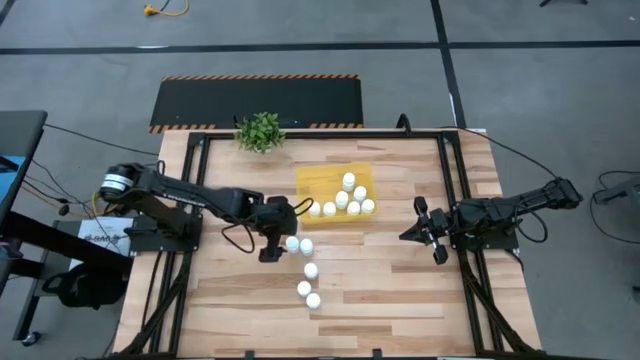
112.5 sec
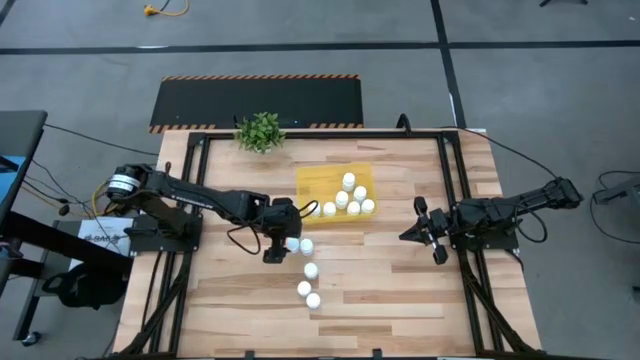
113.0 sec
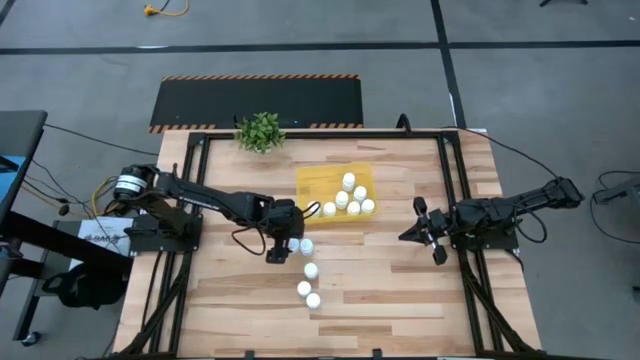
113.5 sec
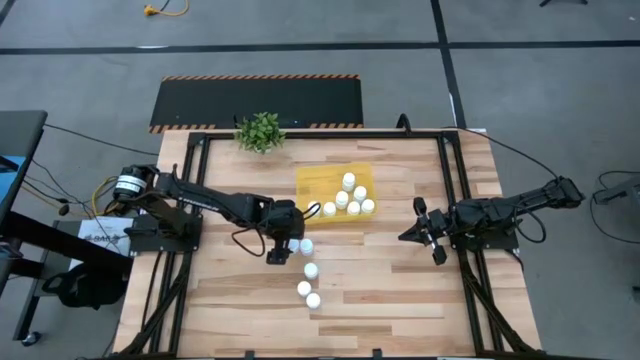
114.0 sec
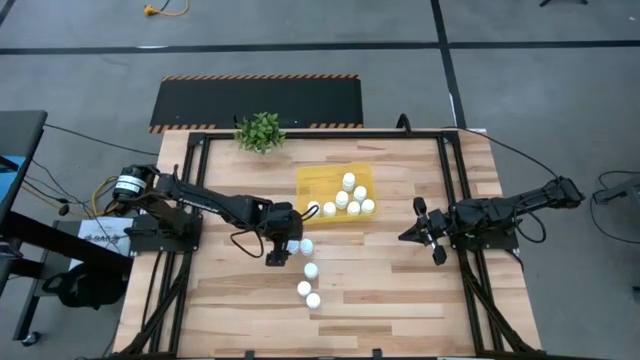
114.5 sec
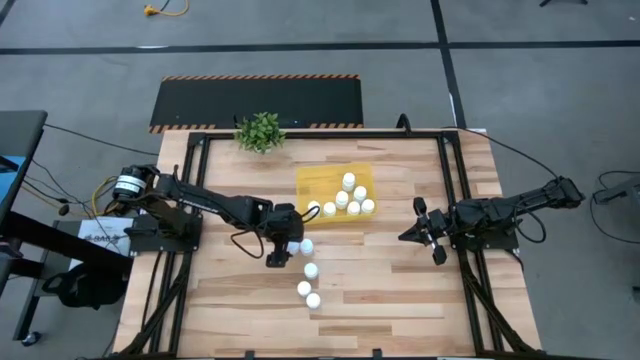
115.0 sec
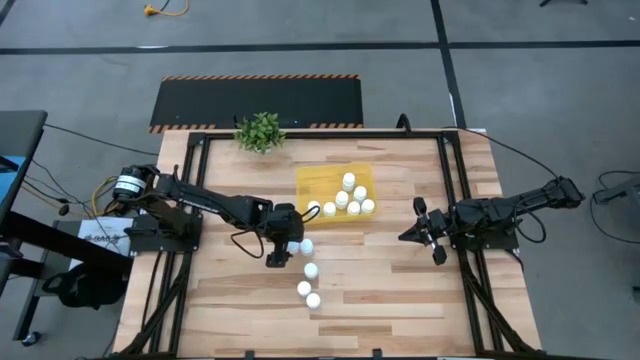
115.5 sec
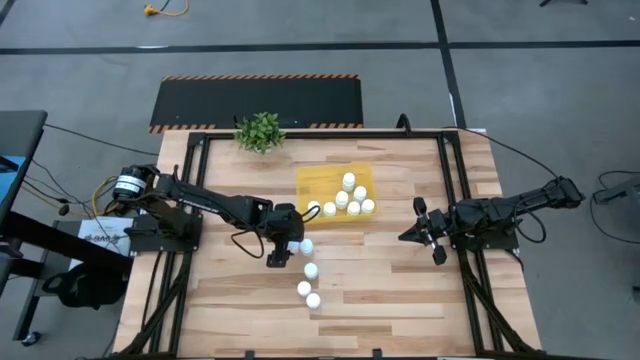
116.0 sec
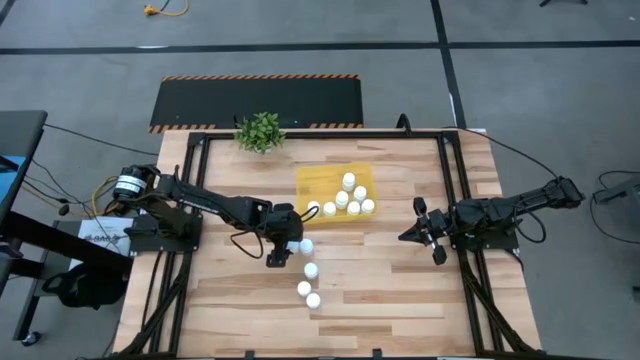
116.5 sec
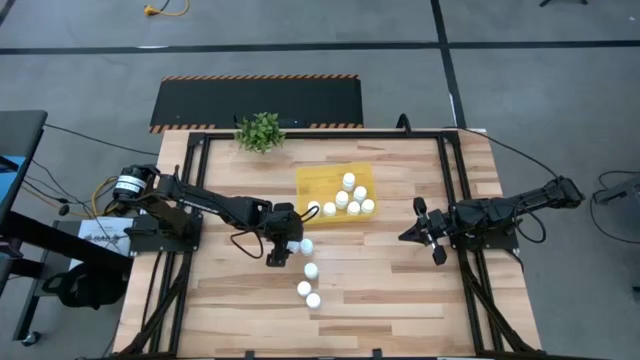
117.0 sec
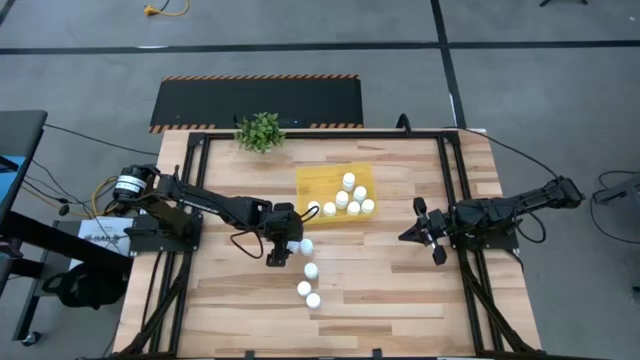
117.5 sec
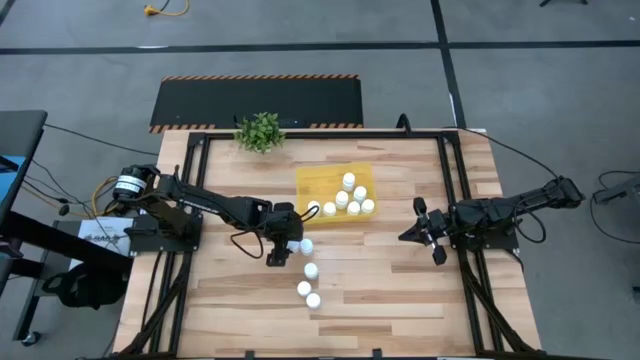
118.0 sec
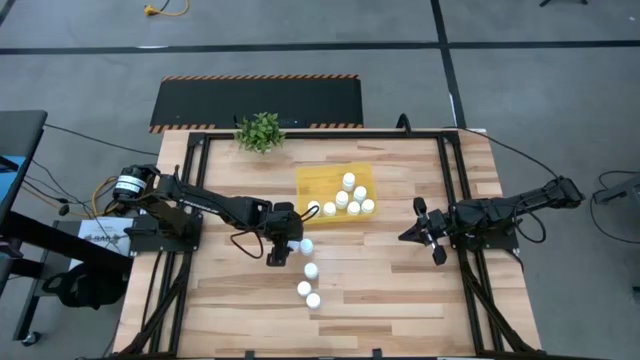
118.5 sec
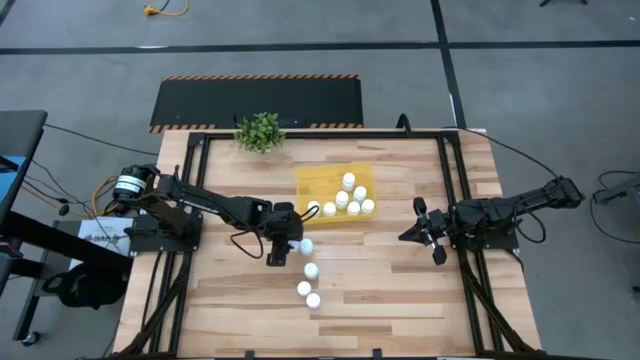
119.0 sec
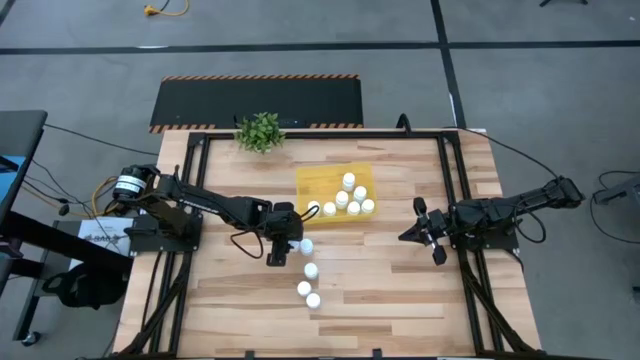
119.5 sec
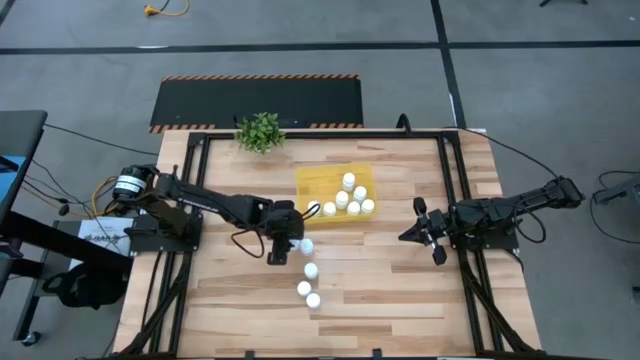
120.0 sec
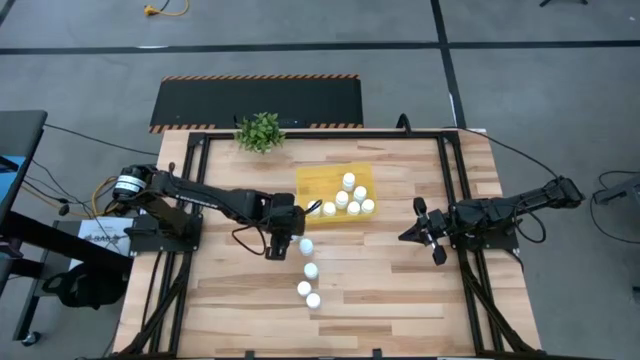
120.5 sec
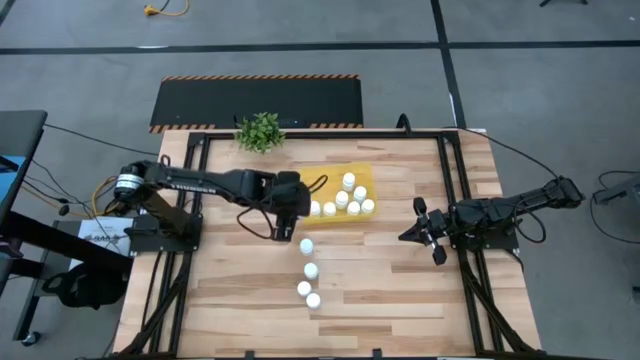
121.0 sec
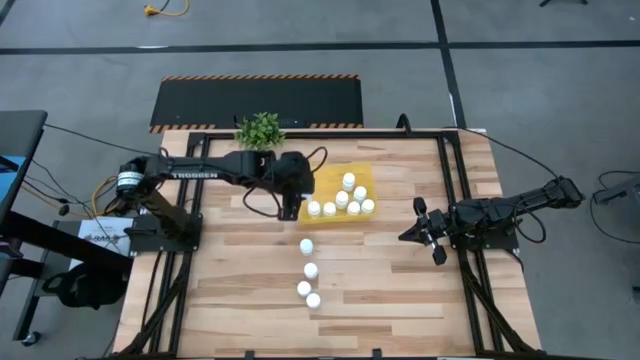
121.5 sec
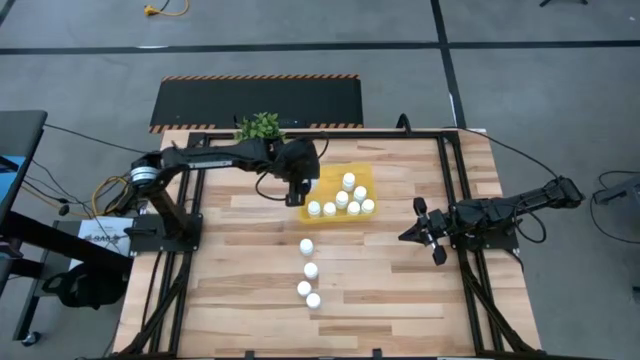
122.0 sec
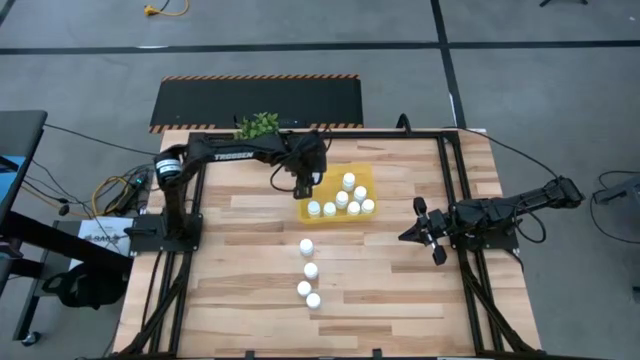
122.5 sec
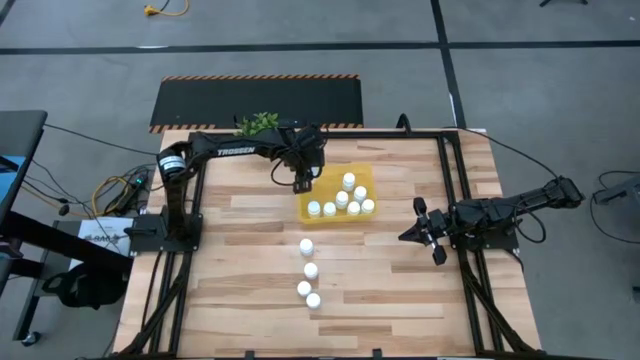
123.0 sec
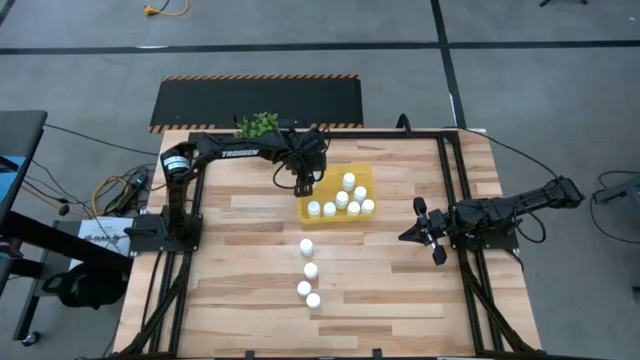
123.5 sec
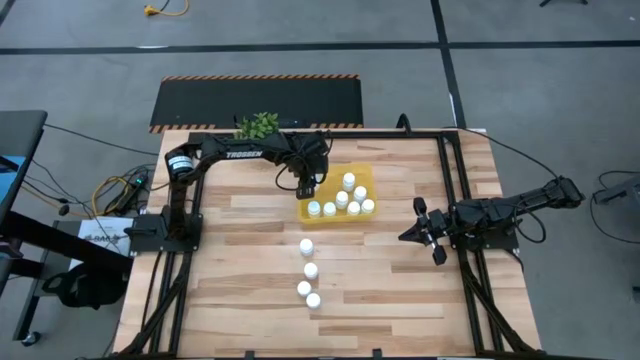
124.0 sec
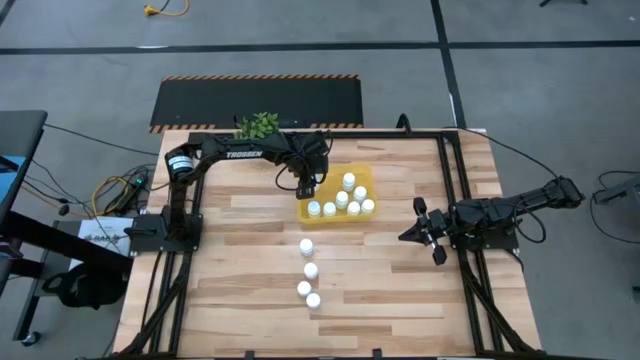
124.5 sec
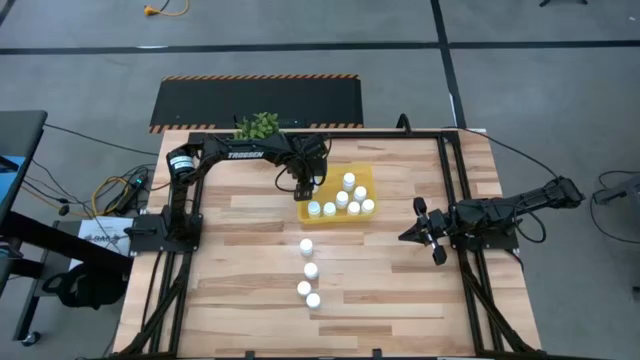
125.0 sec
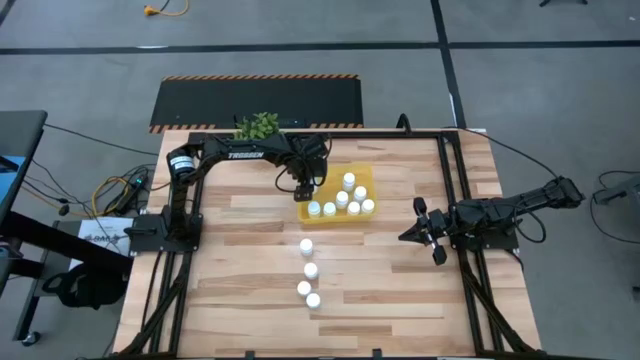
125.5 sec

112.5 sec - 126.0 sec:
Task: Pick and place pill bottles into a basket
Put the white medicine bottle into the yellow bin

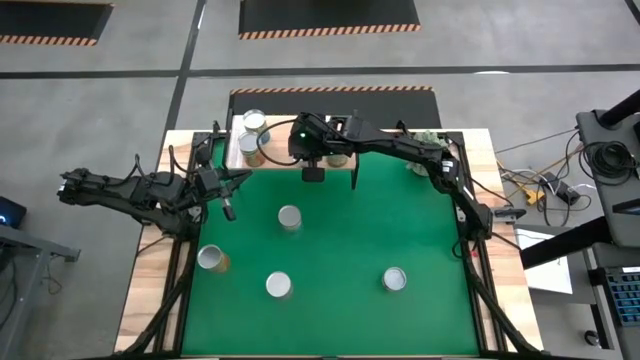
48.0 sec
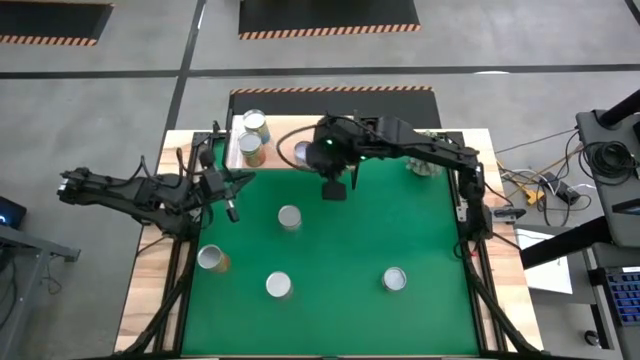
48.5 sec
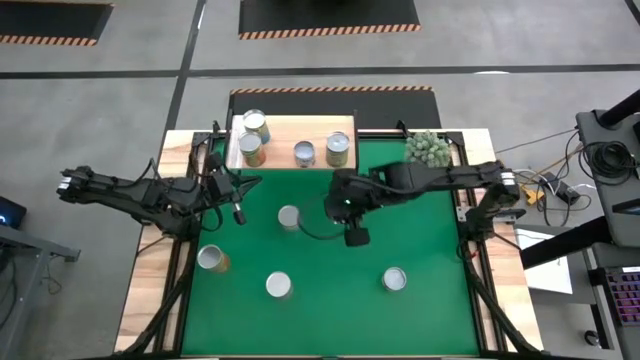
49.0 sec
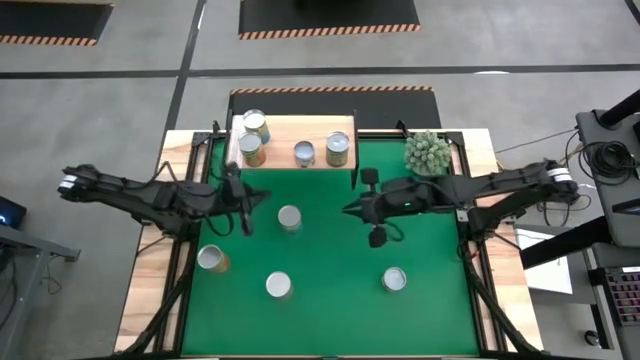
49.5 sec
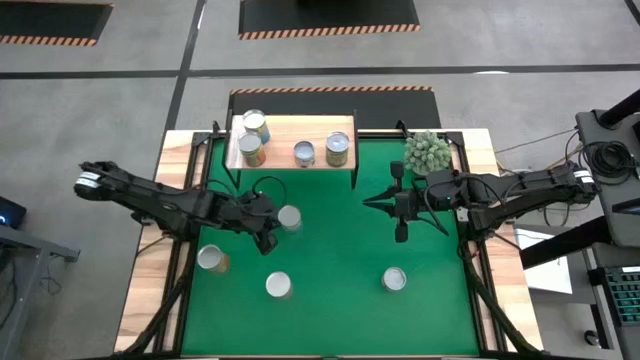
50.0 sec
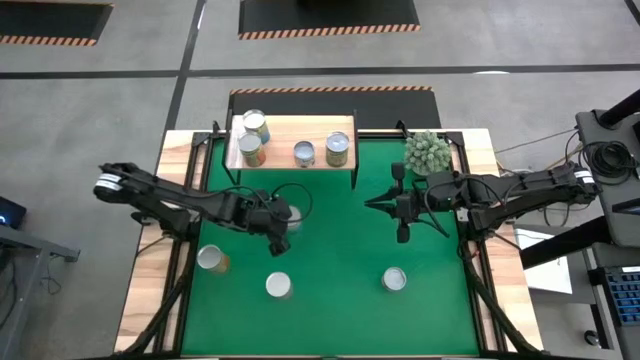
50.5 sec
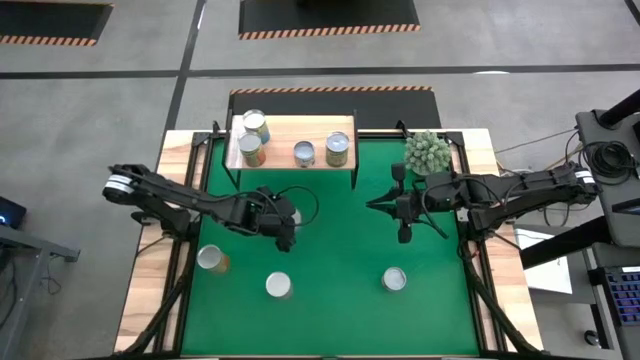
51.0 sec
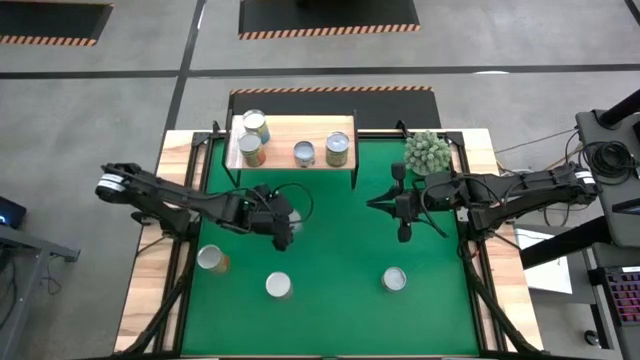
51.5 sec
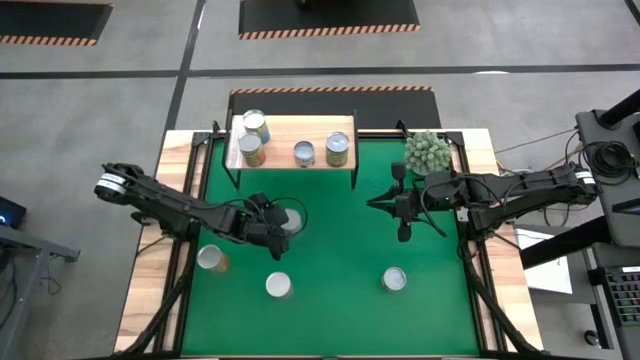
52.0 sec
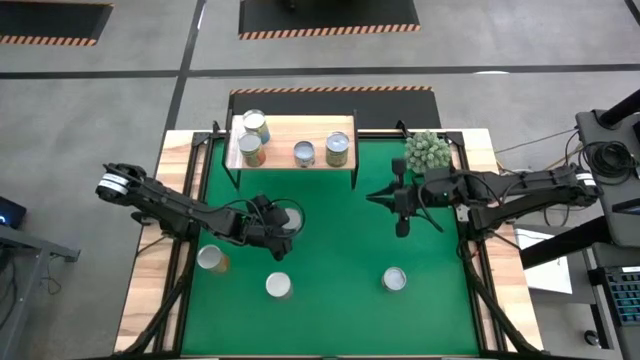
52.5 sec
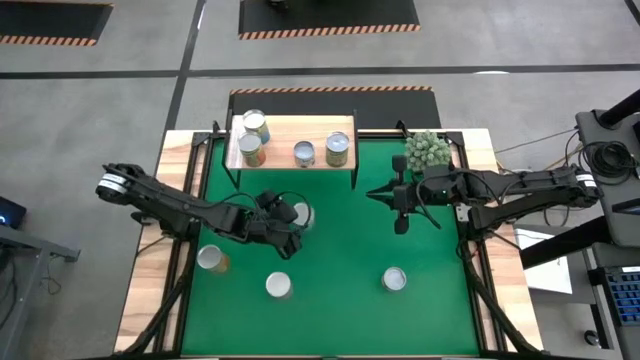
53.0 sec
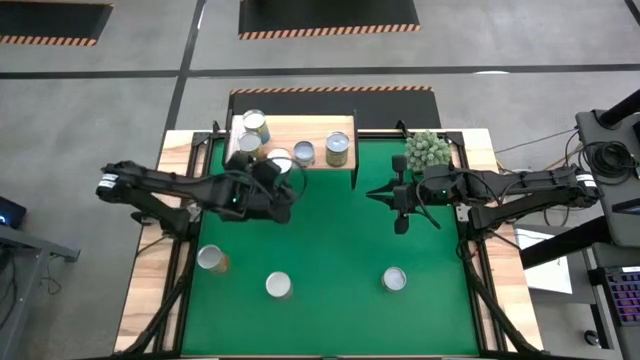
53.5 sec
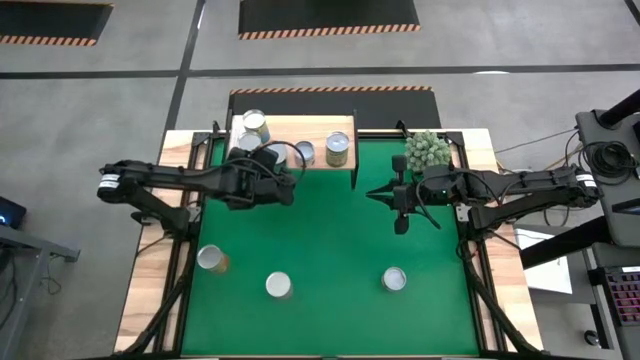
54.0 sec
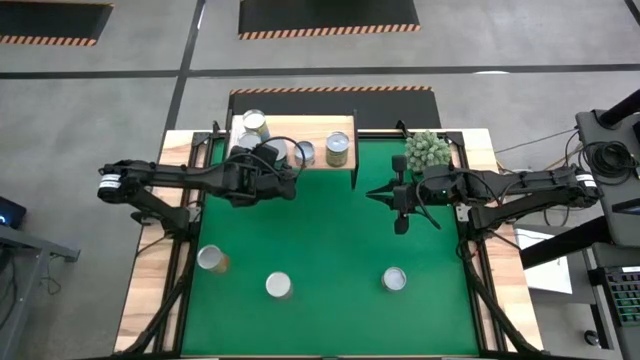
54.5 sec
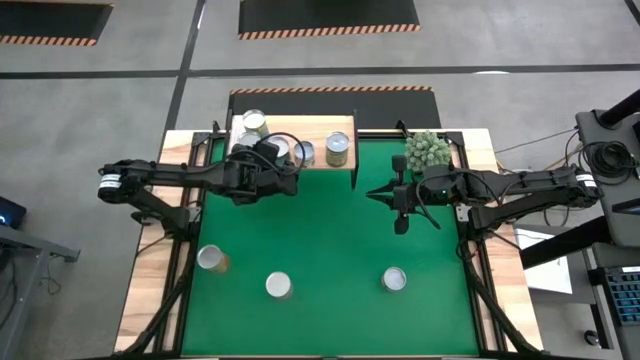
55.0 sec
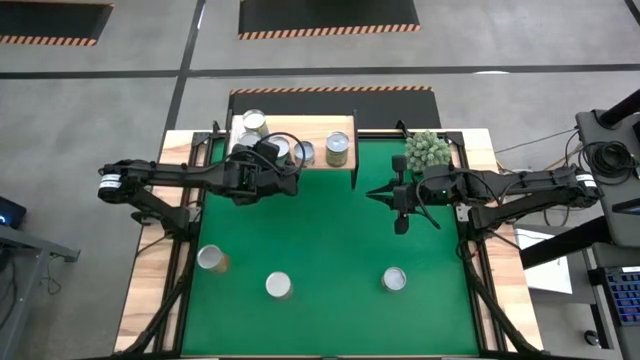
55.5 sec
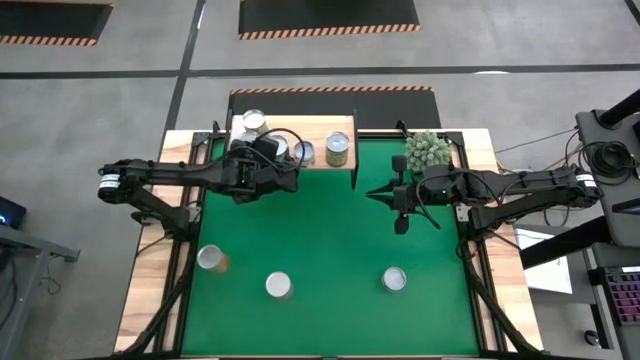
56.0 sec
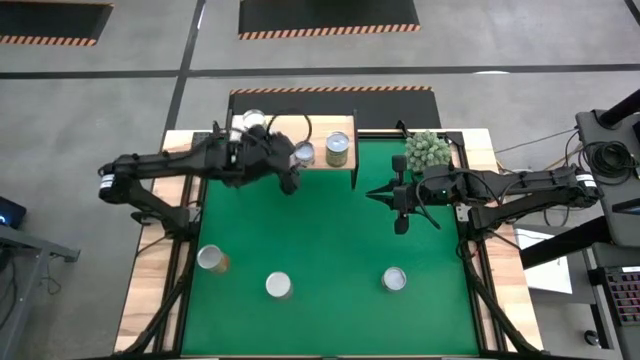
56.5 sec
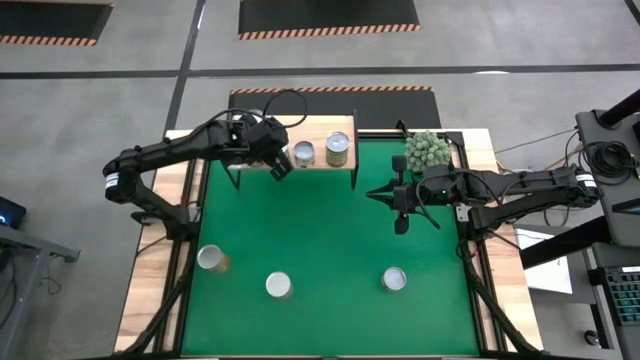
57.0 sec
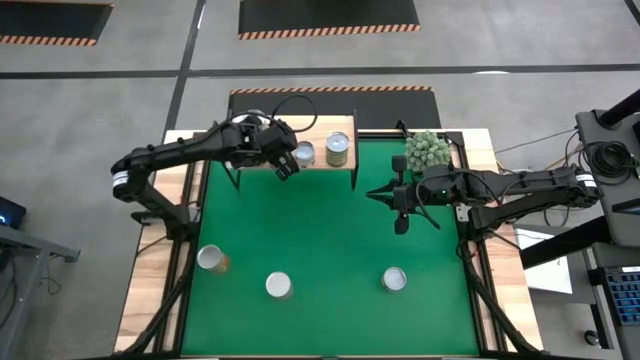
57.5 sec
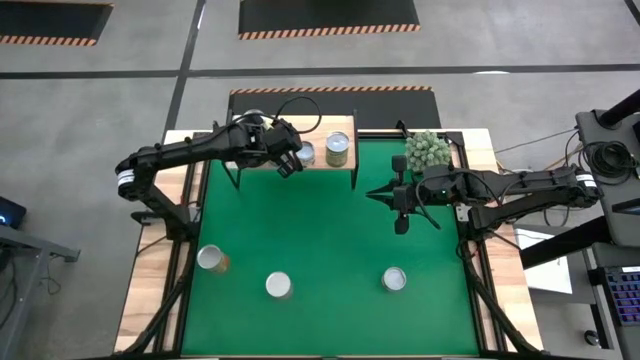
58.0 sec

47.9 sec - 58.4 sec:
Task: Pick and place cans onto a shelf
Put the canned cherries on the shelf
